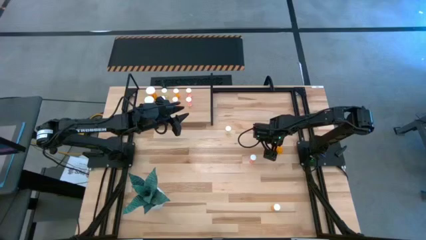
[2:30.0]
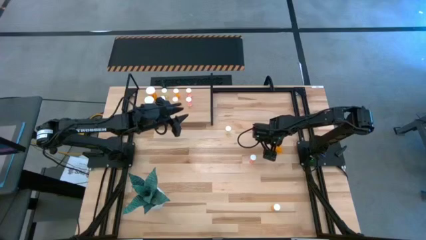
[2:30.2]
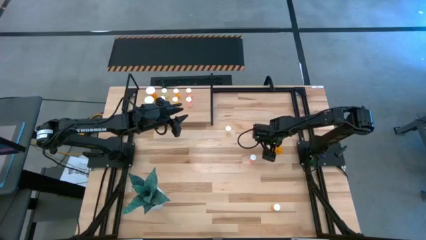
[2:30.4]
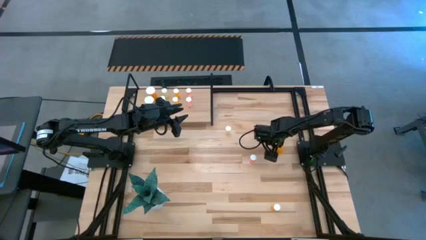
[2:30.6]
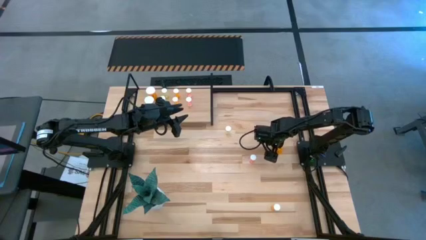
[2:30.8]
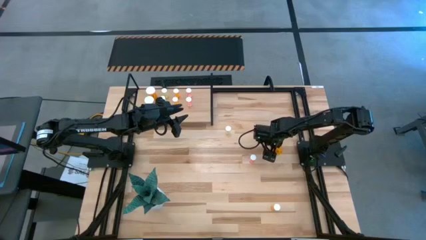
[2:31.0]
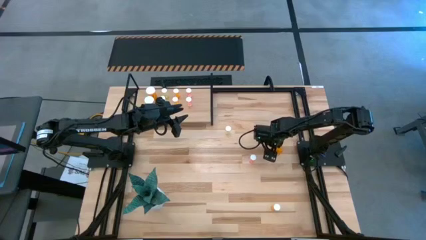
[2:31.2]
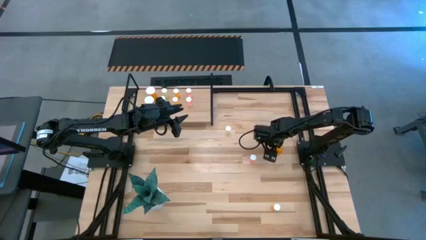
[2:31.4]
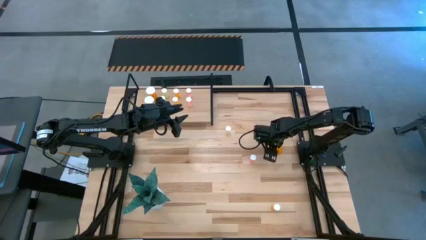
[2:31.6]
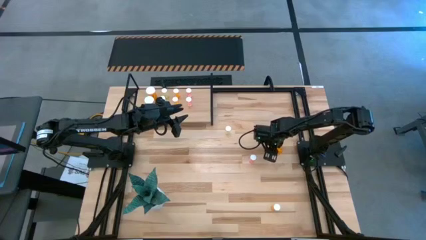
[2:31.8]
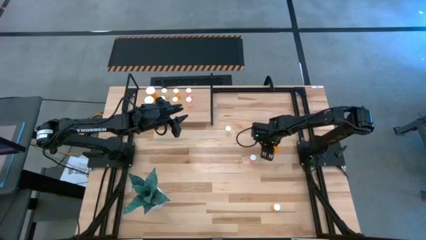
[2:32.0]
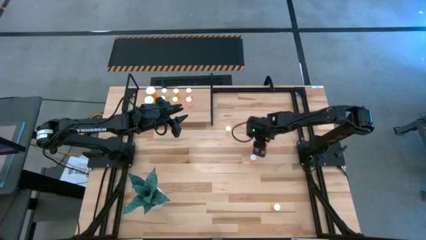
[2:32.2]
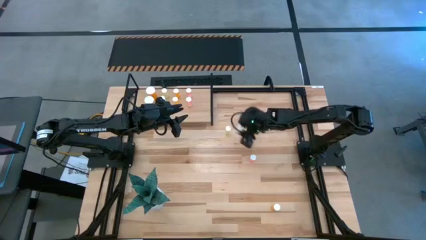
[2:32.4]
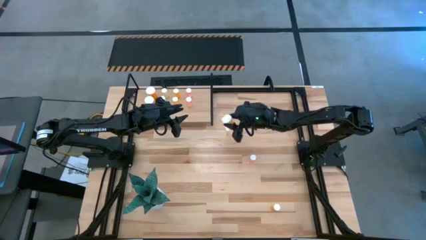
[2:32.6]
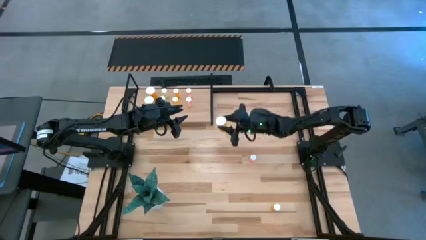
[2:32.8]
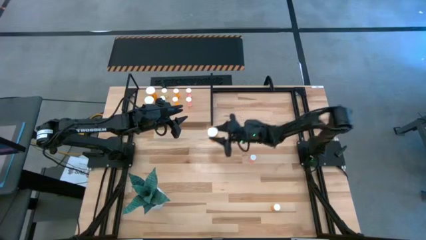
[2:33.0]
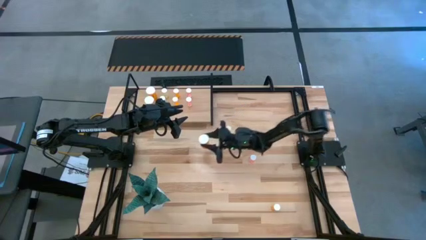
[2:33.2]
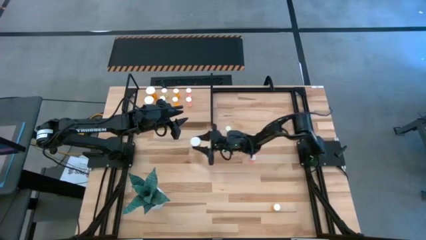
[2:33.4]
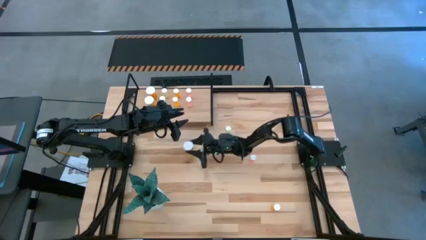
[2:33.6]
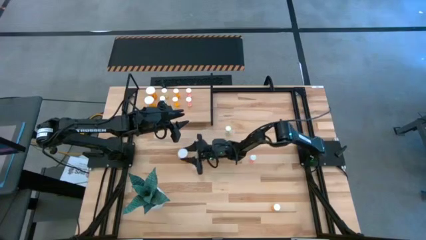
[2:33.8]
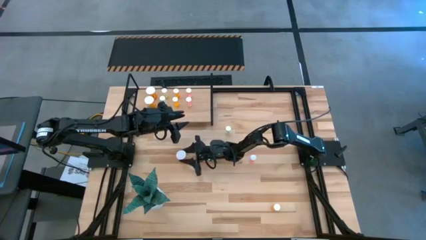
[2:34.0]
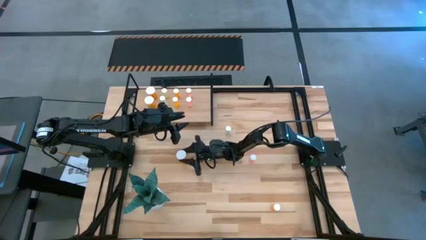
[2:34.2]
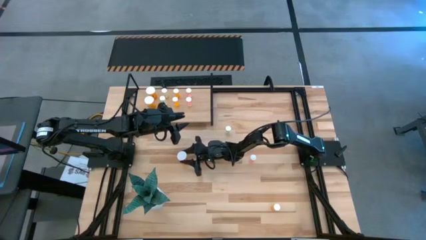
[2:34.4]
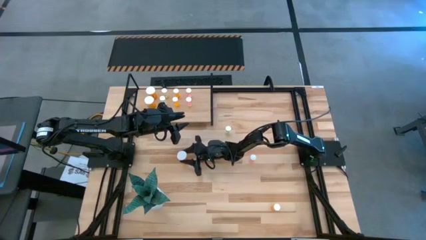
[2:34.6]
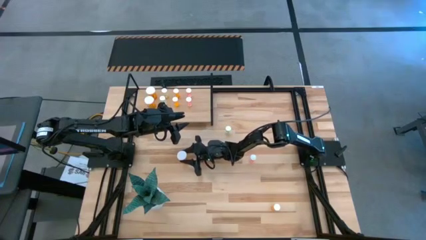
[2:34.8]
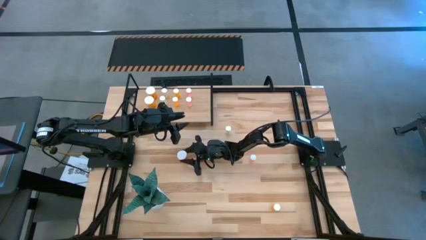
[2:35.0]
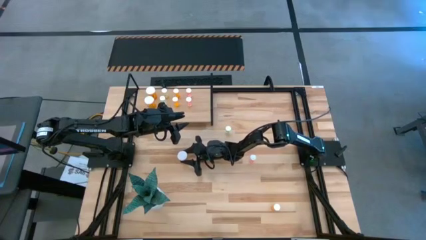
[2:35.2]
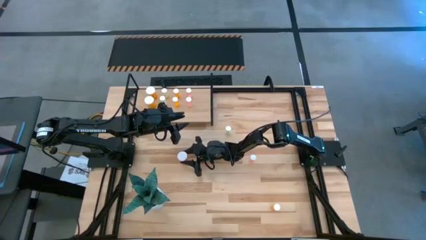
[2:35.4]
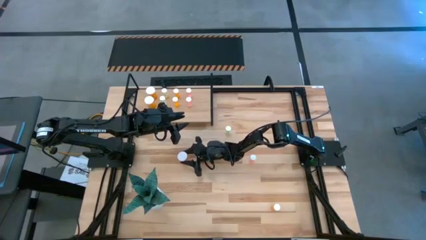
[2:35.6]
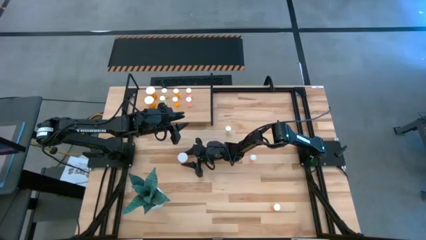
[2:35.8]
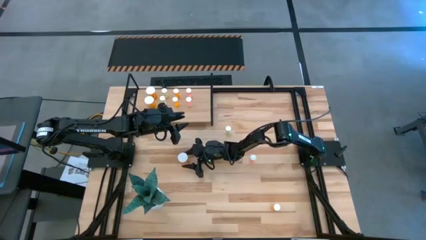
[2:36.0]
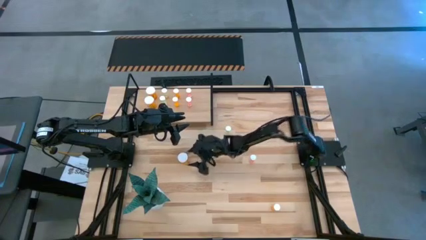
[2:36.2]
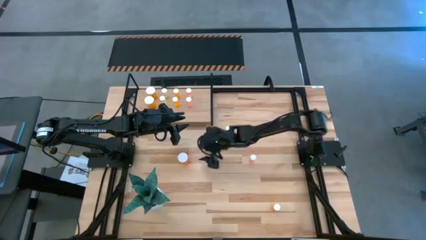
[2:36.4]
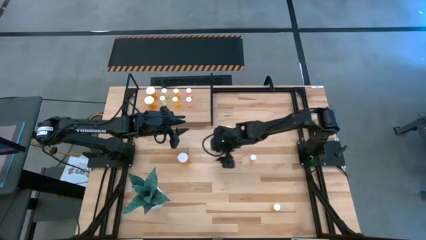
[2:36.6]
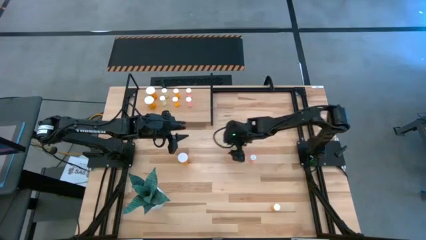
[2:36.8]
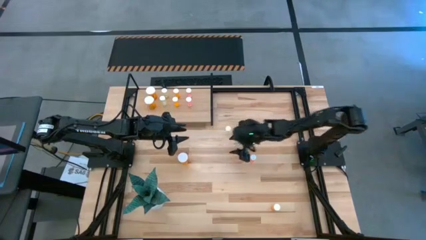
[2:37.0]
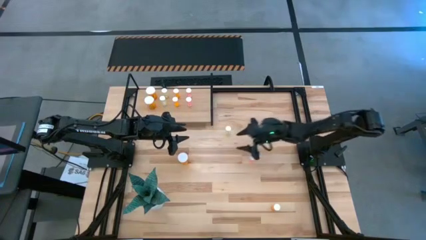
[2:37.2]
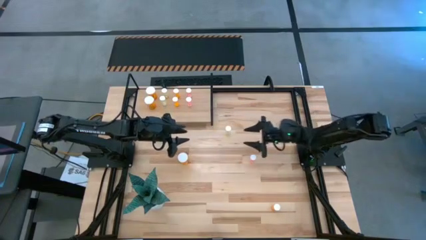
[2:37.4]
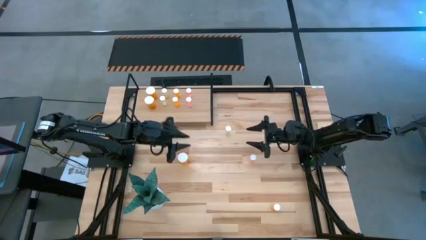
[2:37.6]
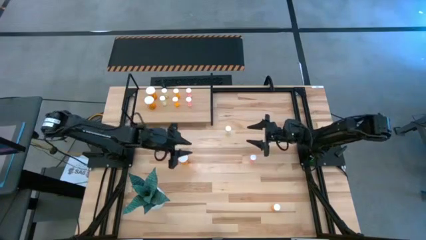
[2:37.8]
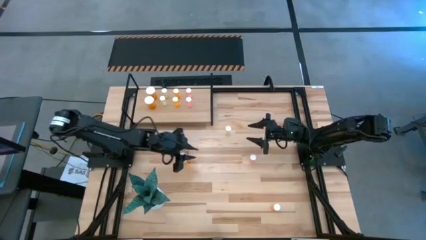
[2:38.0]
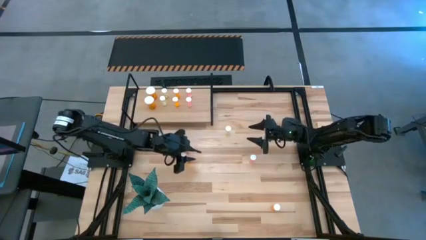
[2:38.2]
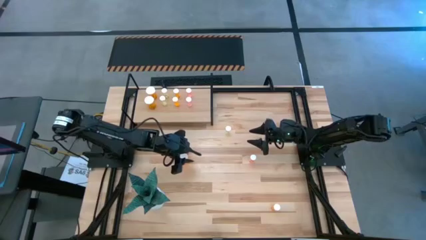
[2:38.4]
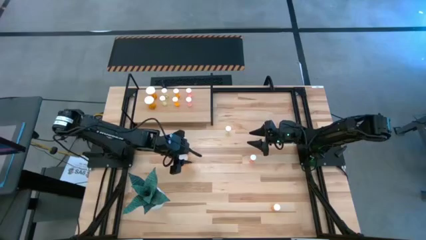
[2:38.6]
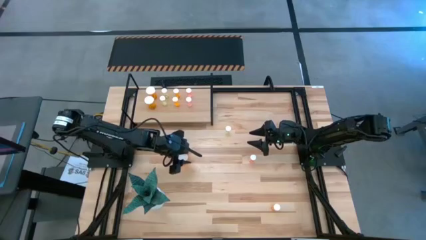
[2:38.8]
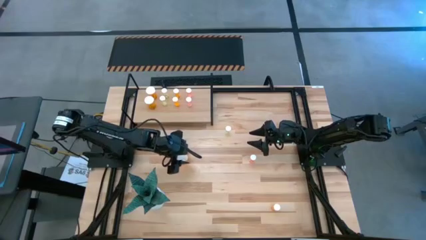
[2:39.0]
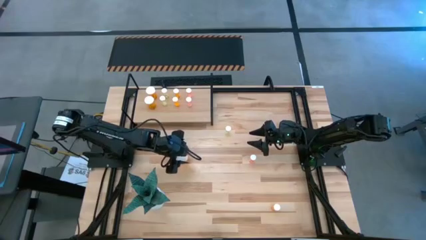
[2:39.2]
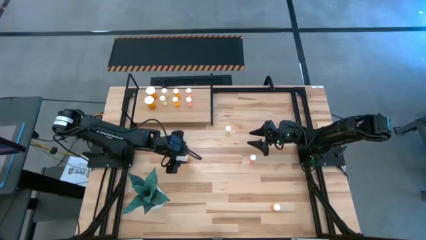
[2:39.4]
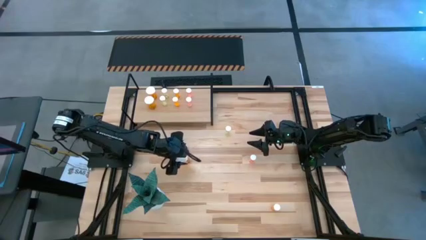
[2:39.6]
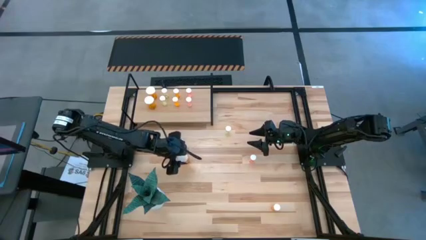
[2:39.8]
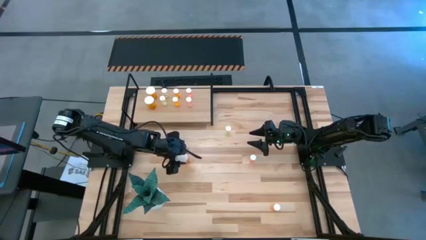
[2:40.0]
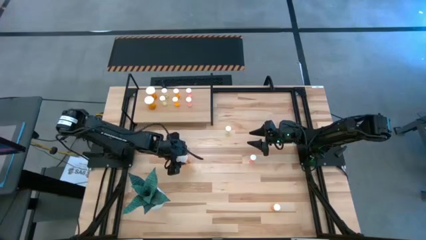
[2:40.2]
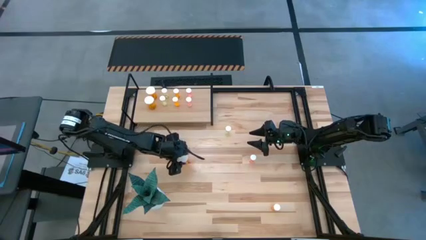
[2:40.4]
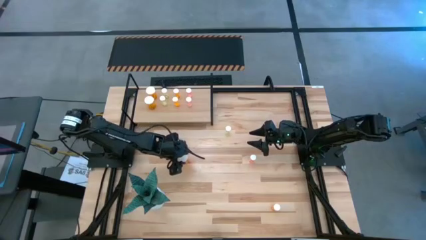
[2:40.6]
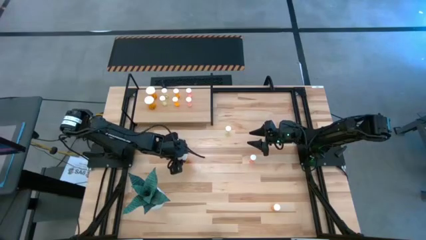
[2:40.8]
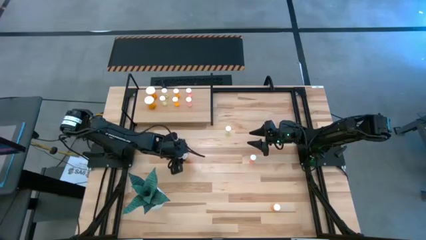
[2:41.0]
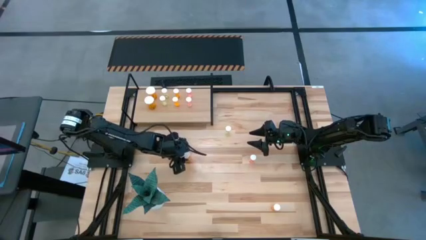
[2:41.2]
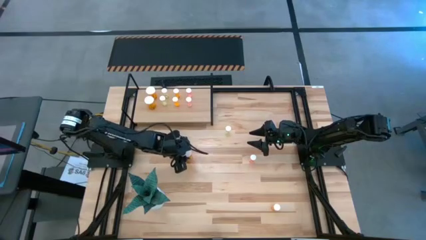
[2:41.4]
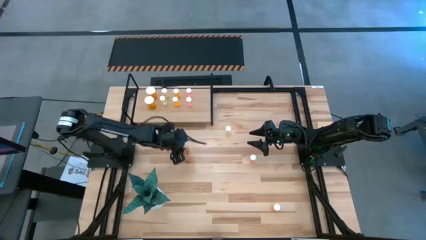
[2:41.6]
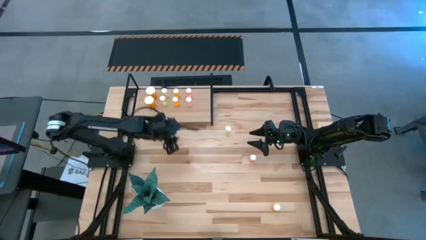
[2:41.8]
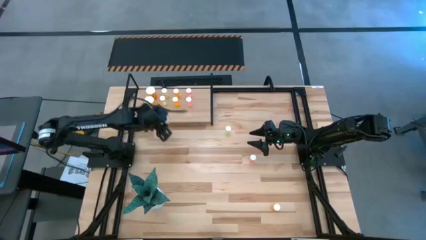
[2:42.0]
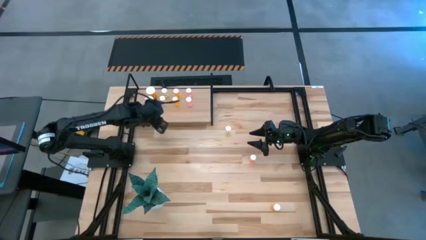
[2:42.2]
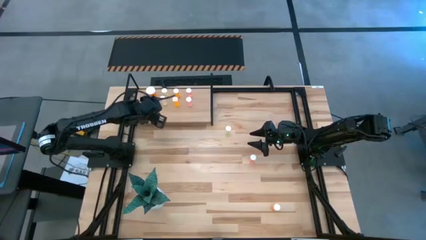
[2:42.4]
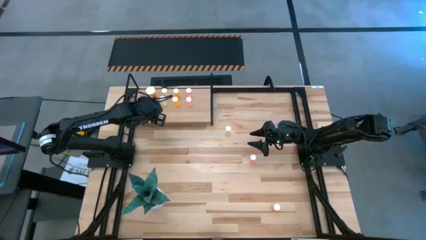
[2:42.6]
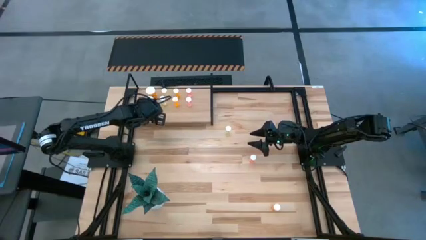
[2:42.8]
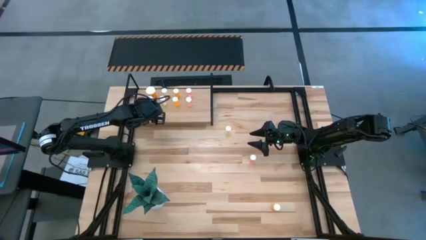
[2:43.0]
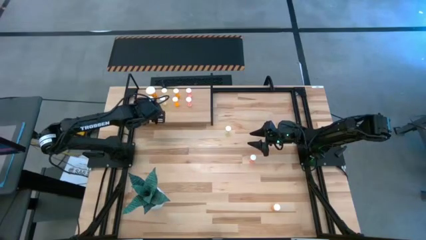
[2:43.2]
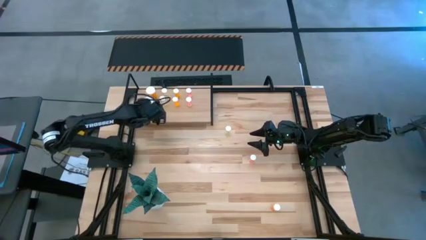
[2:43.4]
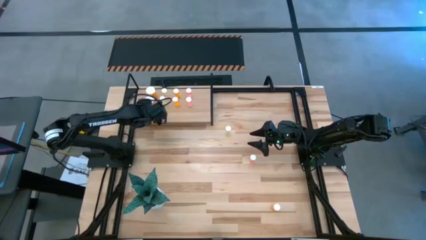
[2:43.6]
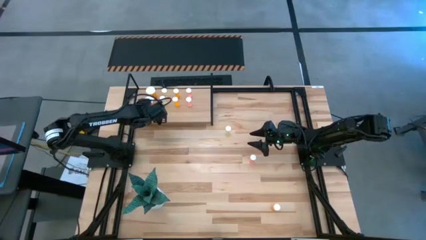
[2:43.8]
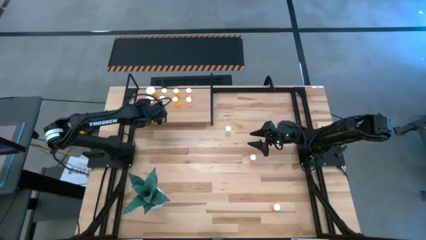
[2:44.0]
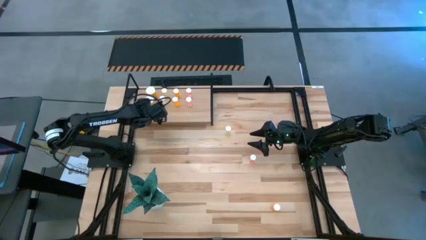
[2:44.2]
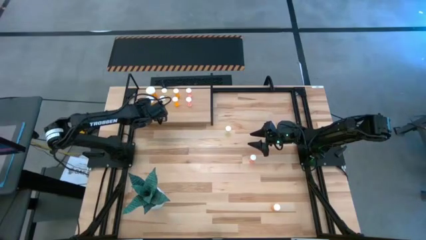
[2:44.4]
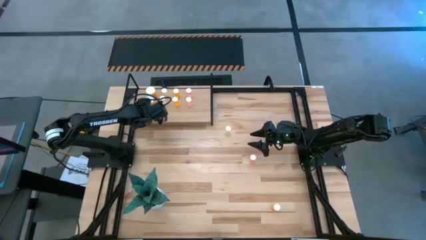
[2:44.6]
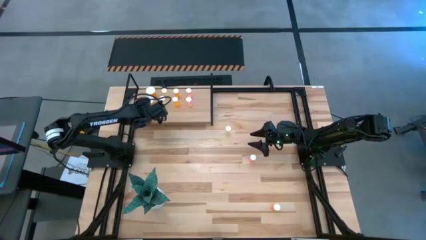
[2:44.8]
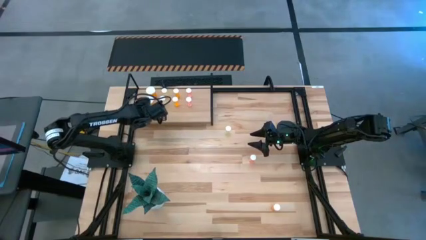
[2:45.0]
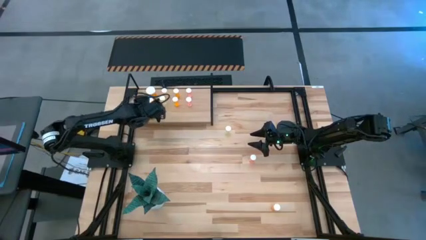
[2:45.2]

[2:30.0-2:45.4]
Task: Pick and place medicine bottles onto shelf by color
Put the big orange pill bottle aligned with the other orange pill bottle on the shelf
